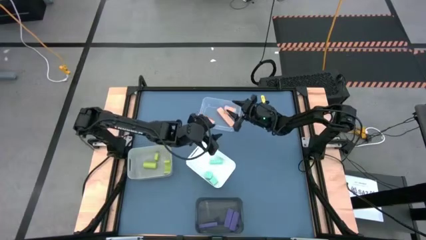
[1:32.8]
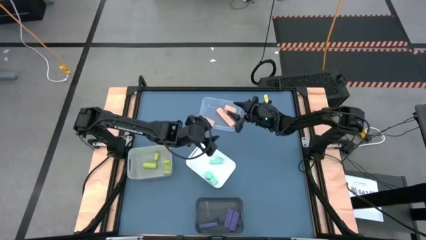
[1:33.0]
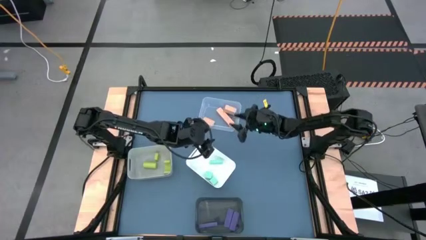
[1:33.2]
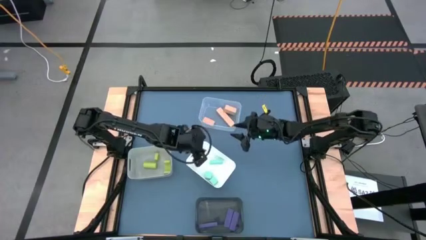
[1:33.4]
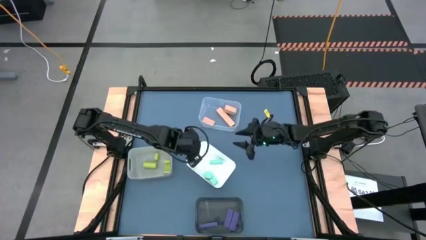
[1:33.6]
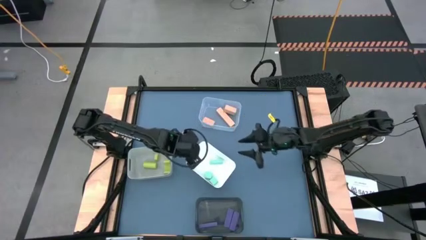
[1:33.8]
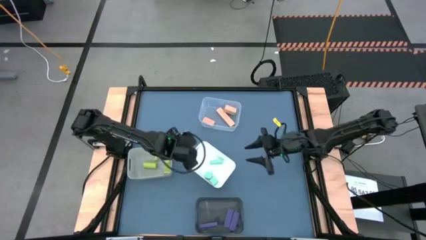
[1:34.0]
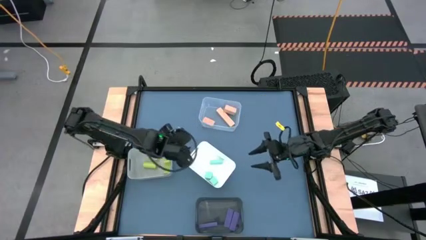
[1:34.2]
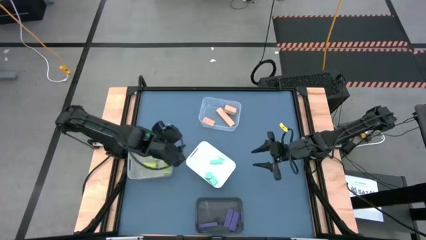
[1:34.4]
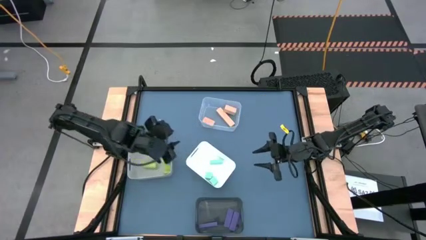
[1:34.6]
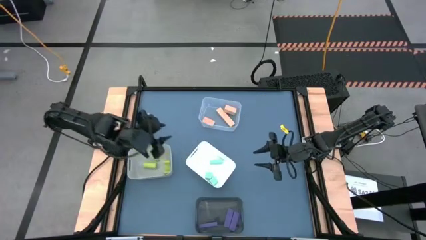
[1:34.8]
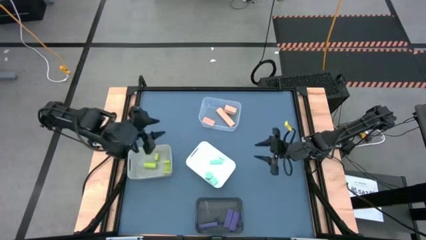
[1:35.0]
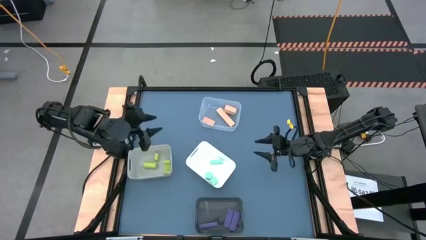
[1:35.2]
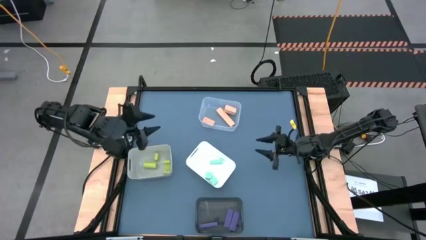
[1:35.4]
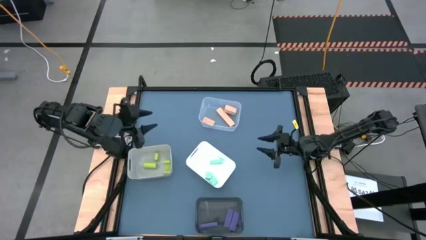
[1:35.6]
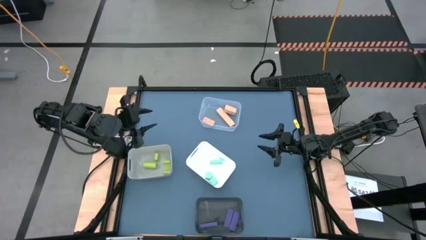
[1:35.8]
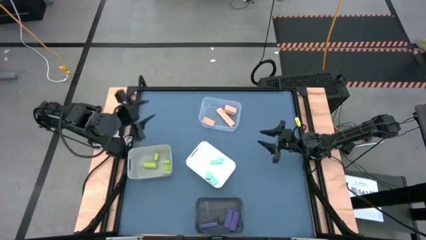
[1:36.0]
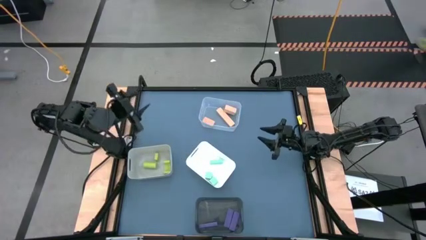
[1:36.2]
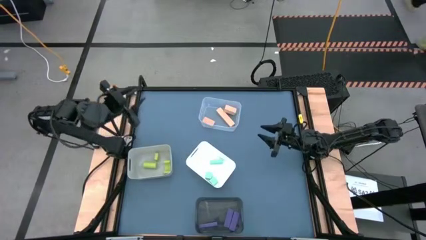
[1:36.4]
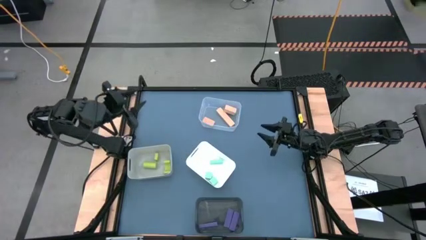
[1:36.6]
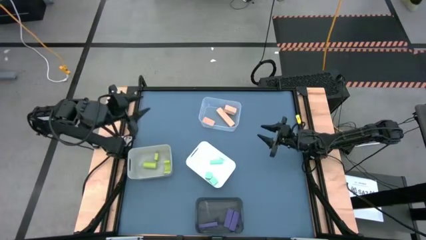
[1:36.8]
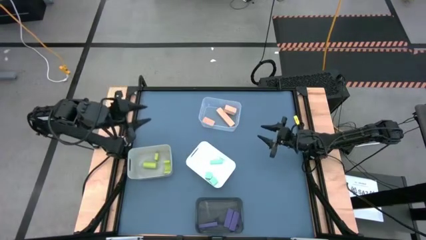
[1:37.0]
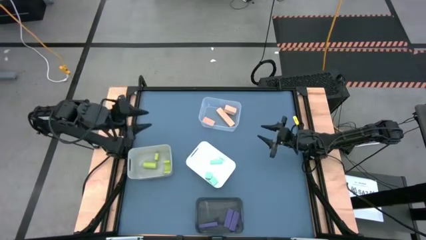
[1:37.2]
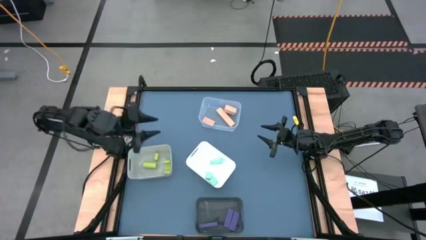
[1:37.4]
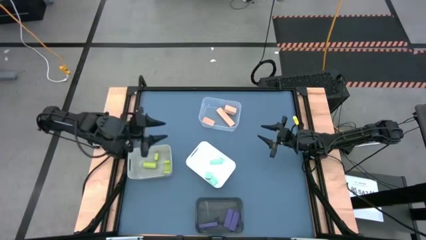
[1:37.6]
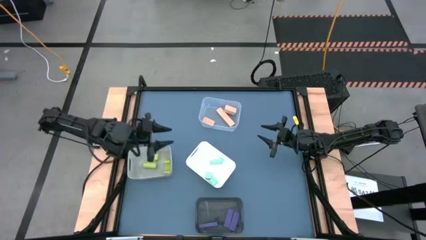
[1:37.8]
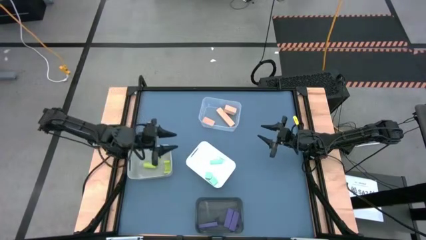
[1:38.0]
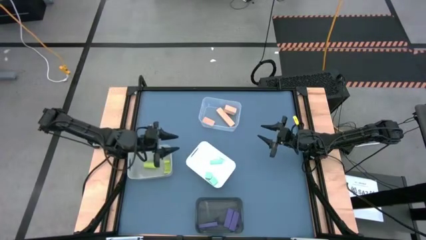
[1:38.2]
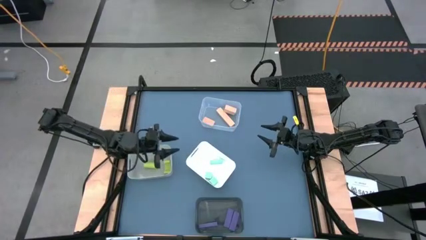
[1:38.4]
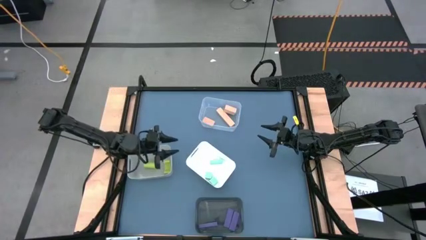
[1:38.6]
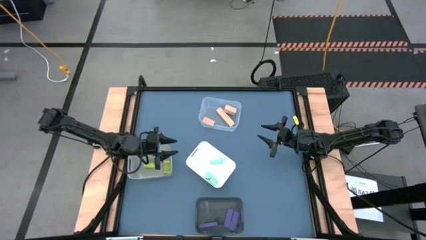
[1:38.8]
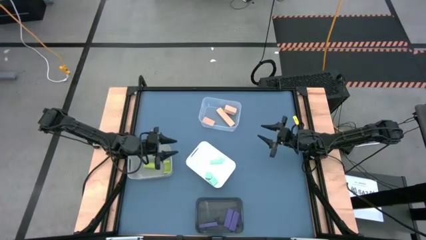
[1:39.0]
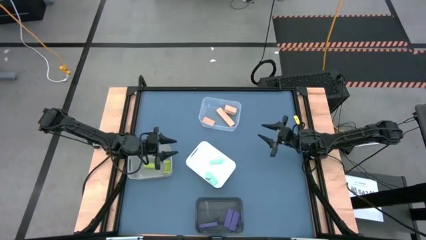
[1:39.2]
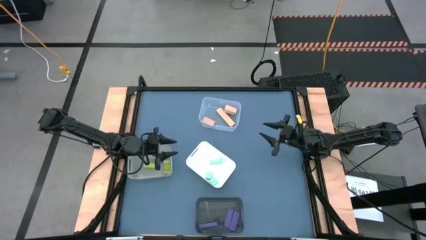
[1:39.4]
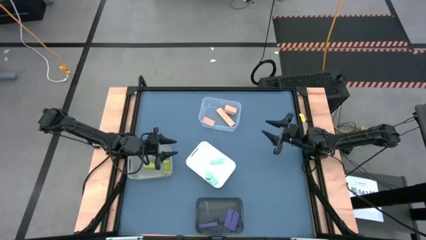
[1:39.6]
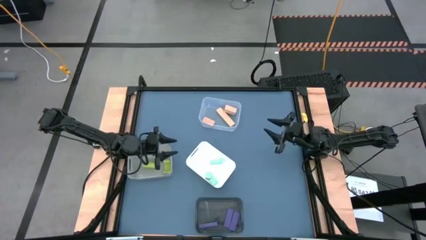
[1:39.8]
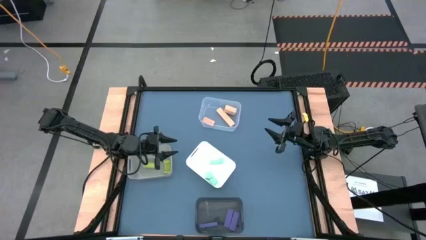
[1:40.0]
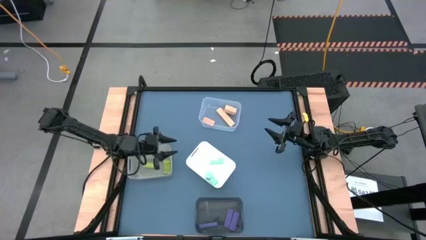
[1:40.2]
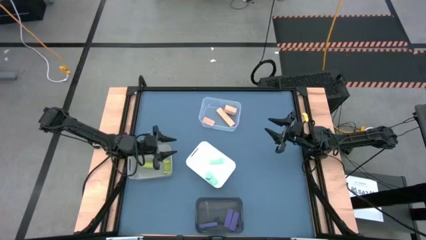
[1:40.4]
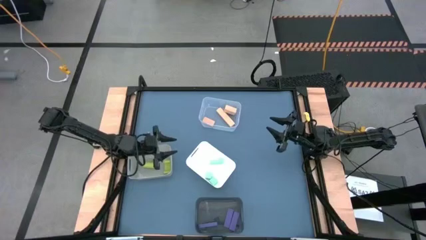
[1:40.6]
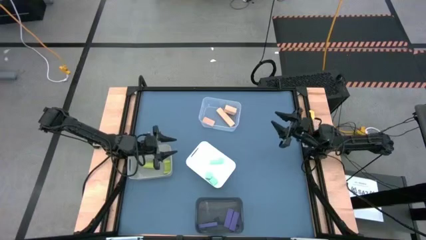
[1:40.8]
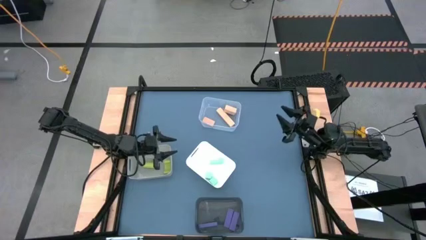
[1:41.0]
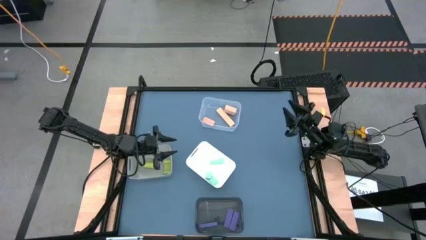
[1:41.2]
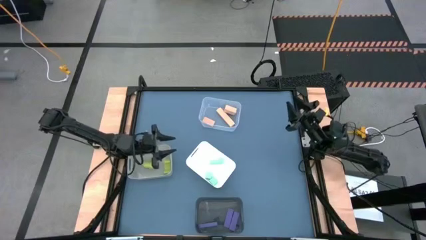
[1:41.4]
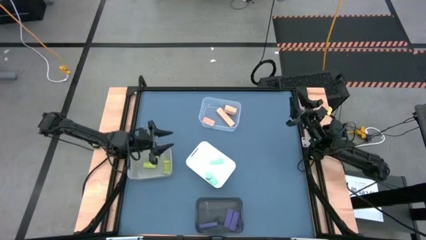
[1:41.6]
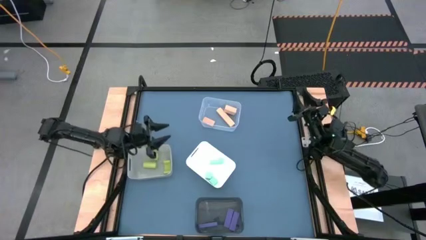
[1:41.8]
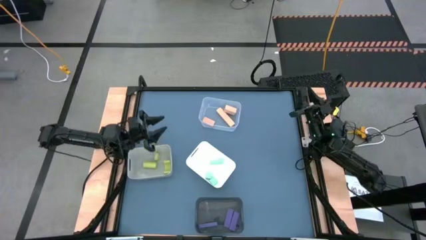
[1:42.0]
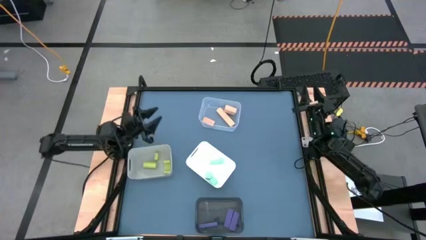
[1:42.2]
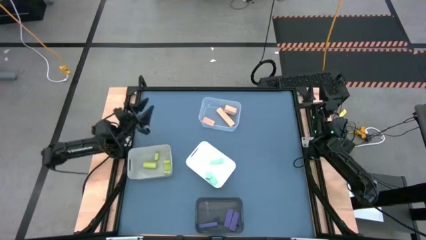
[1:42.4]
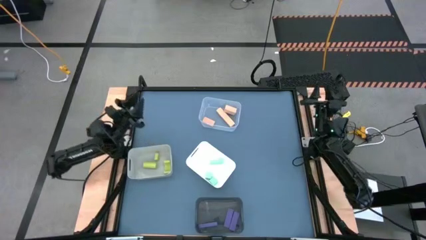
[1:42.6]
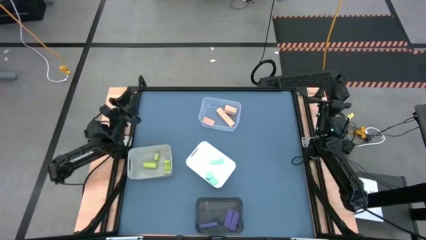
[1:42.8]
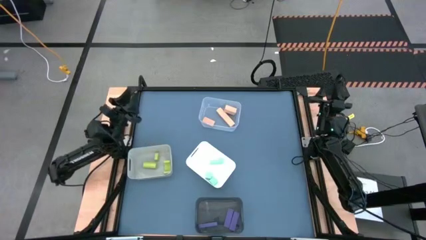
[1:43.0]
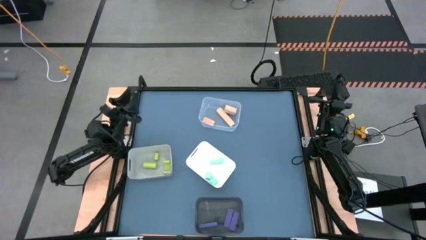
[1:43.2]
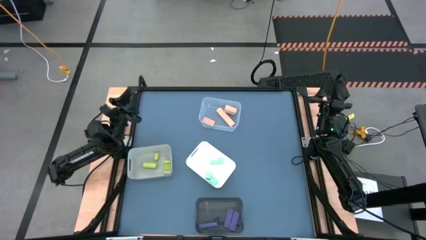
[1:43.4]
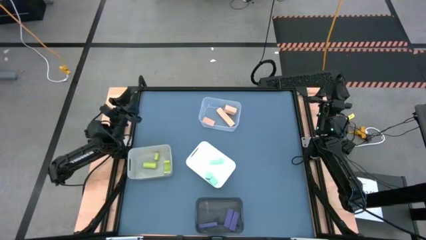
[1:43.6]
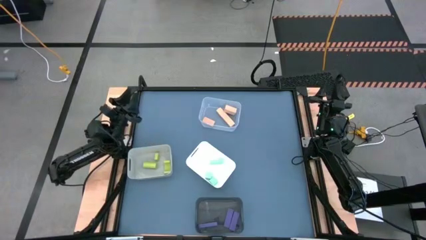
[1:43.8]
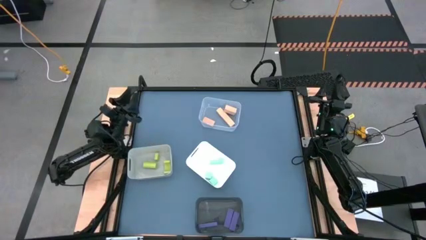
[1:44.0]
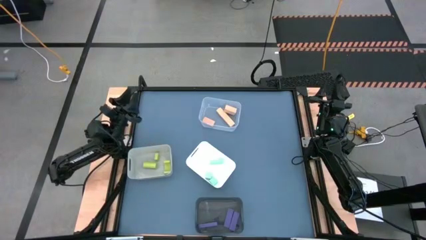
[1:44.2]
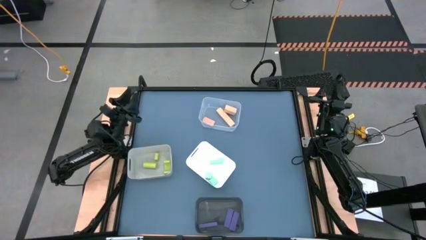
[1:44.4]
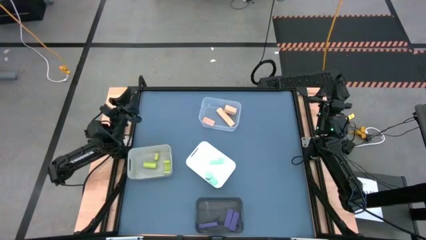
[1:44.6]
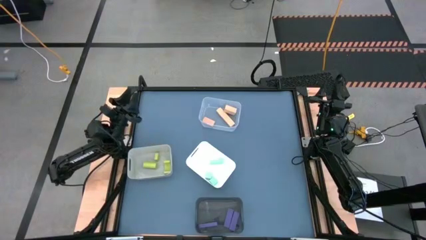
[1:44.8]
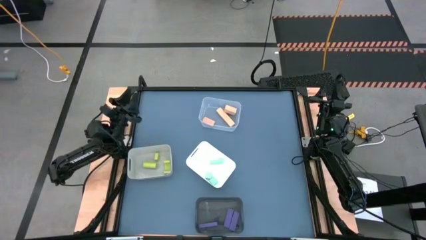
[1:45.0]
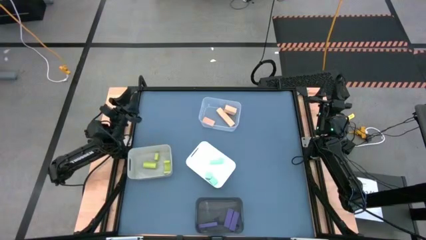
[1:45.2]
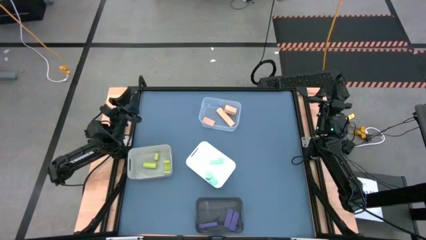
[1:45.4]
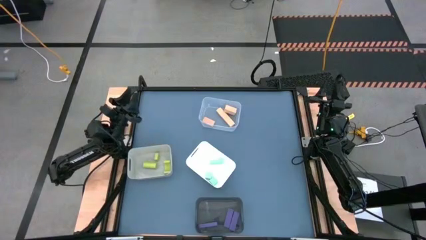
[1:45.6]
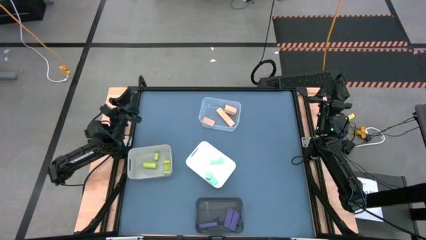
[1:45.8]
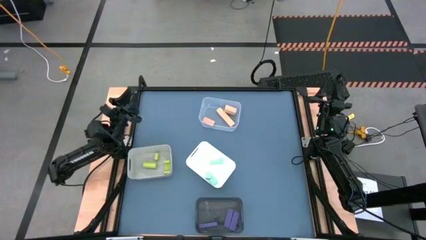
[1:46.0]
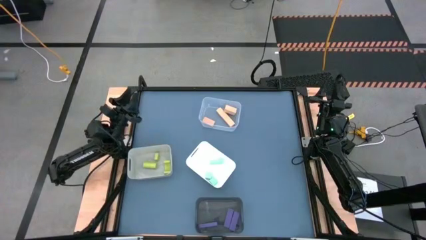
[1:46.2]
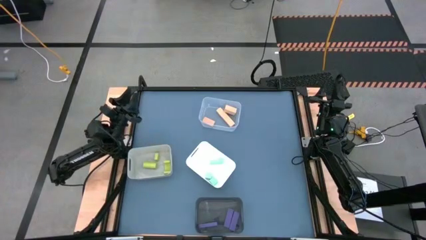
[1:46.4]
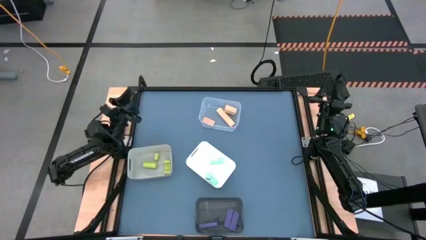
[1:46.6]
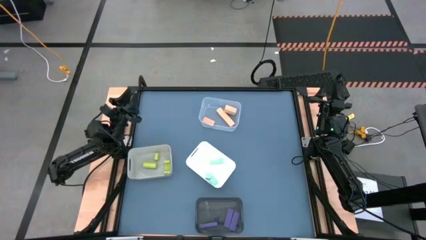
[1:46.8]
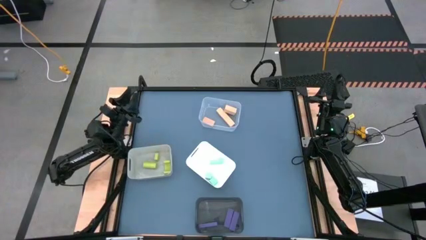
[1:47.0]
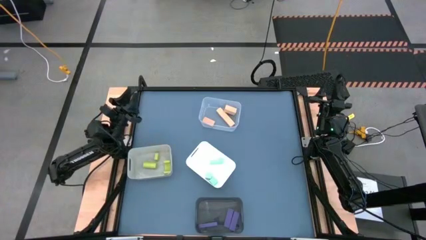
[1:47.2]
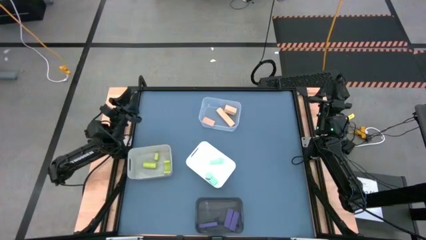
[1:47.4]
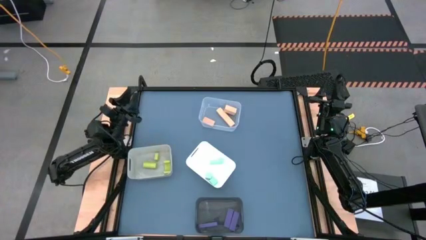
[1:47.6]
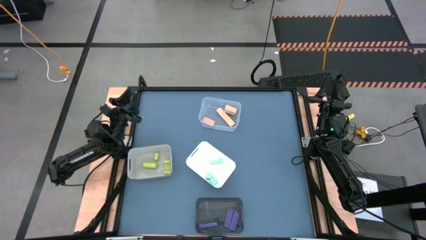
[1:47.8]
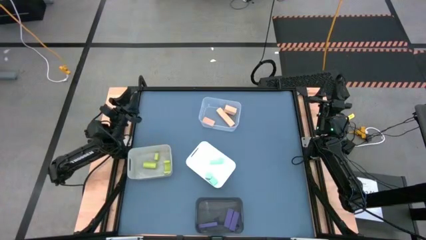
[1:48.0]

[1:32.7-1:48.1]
Task: Sort & place blocks by color
Return to Home Position
